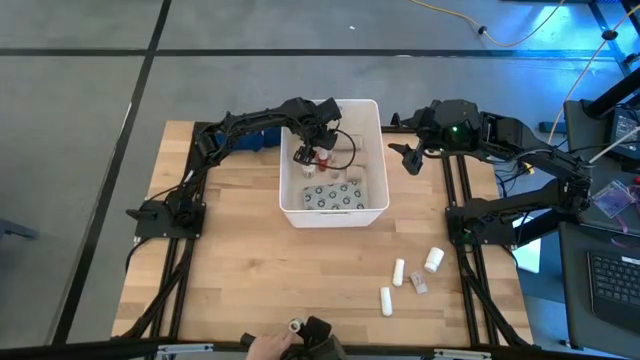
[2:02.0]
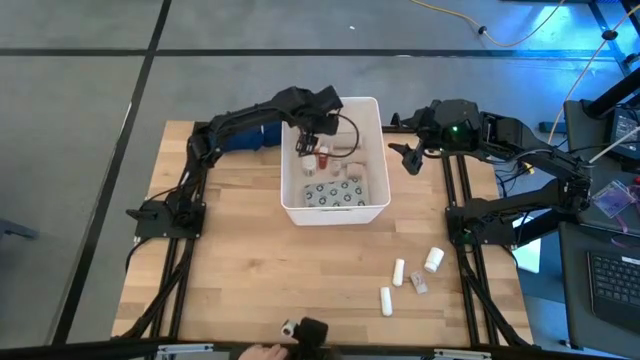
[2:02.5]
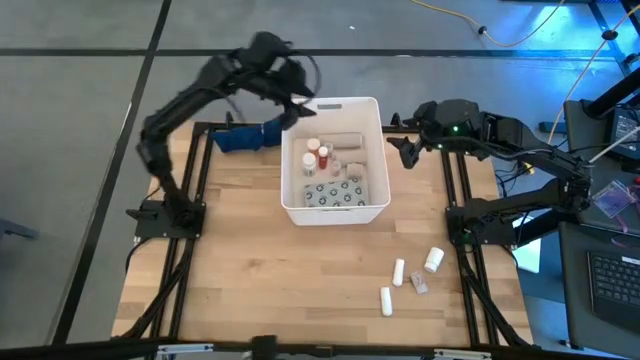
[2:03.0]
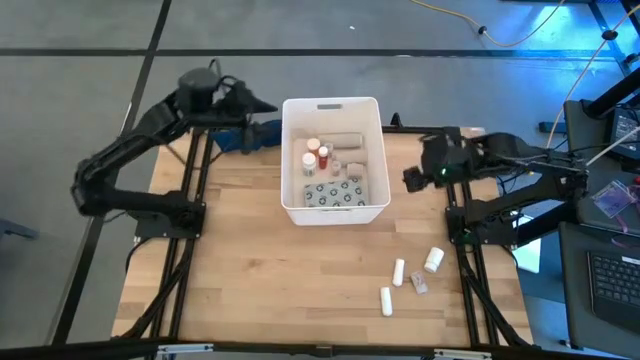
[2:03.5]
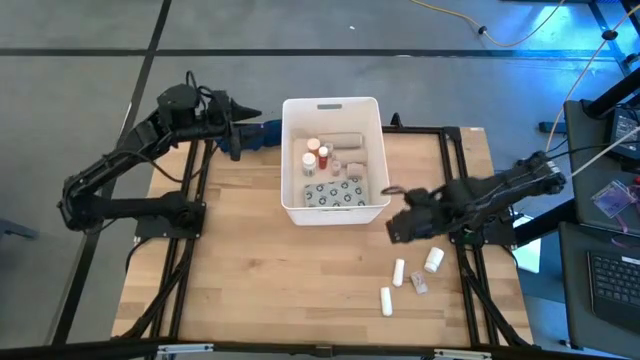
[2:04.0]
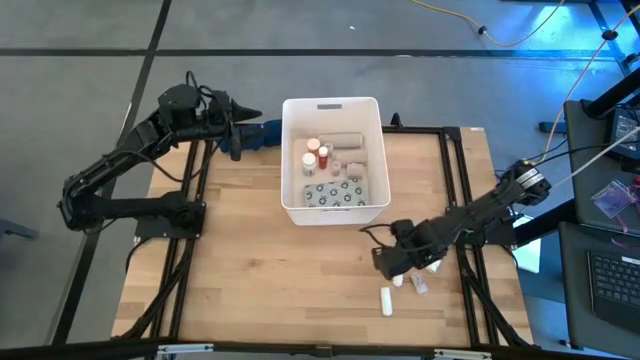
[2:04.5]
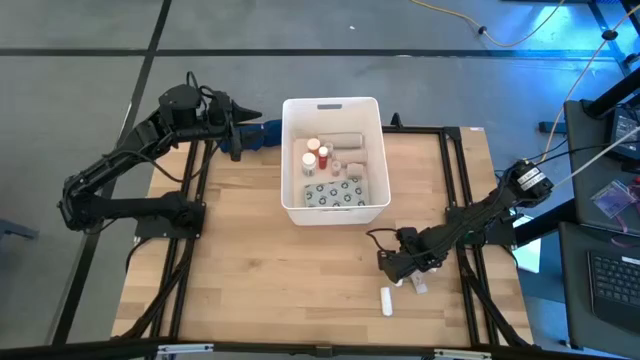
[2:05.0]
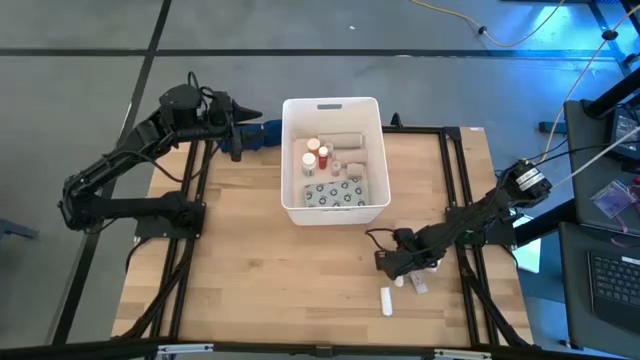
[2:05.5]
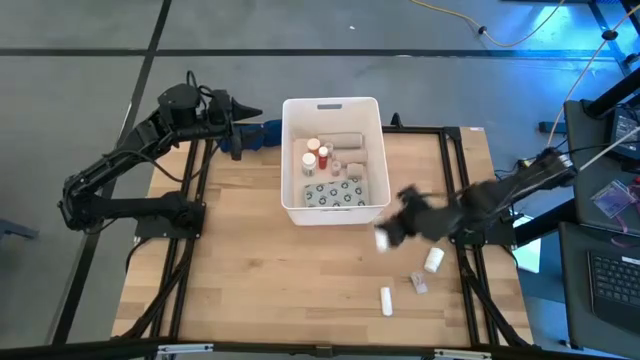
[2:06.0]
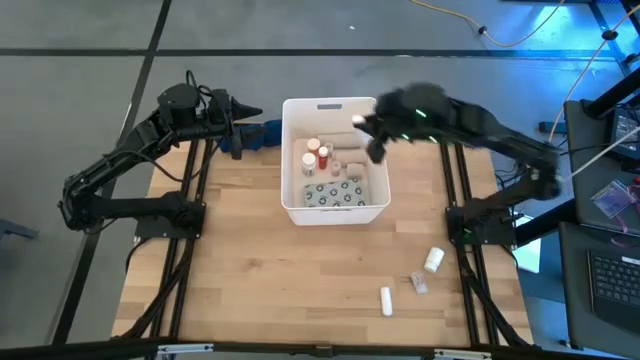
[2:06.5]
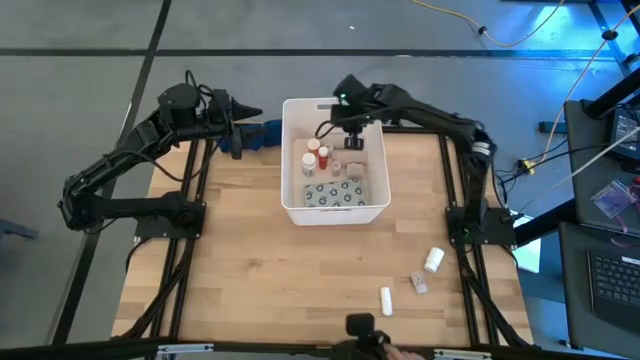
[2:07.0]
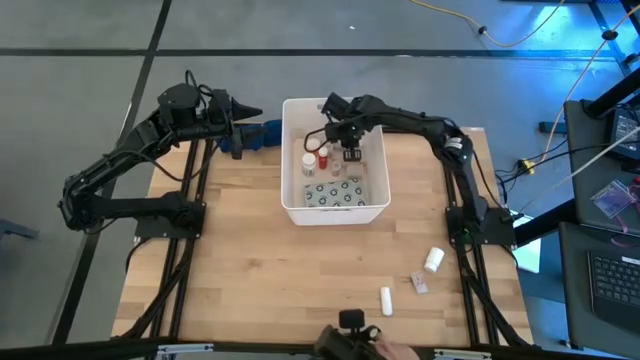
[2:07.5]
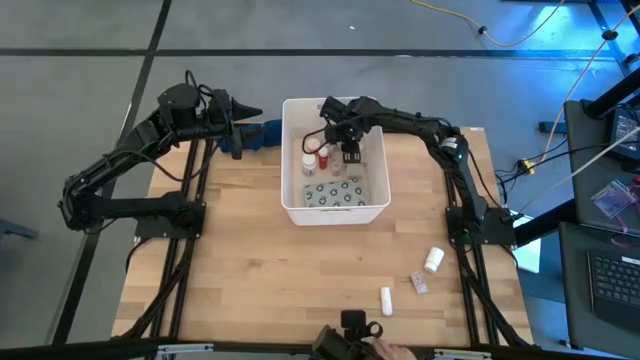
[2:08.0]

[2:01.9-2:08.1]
Task: Pick & place medical supplies in basket/bin
Put the top white gauze into the bin

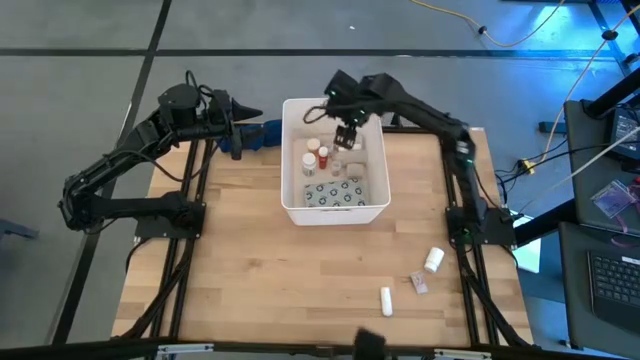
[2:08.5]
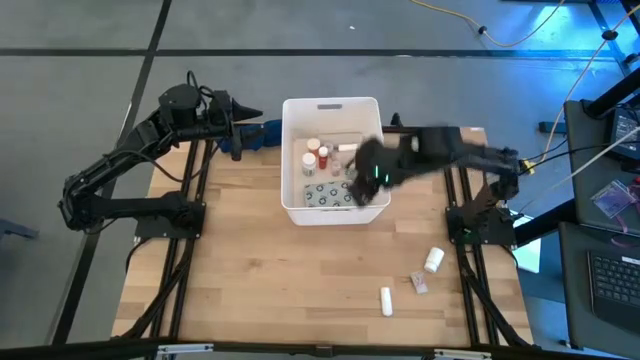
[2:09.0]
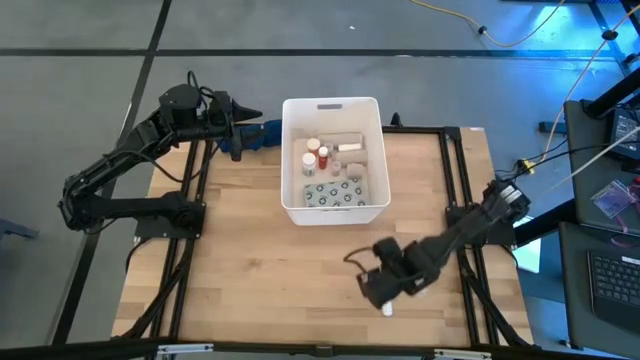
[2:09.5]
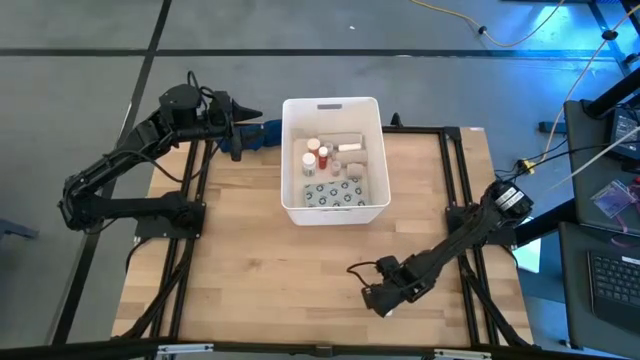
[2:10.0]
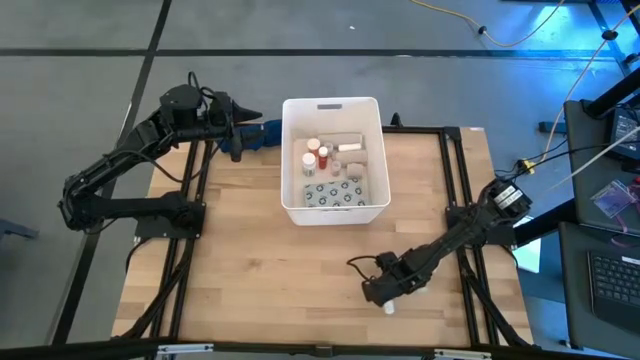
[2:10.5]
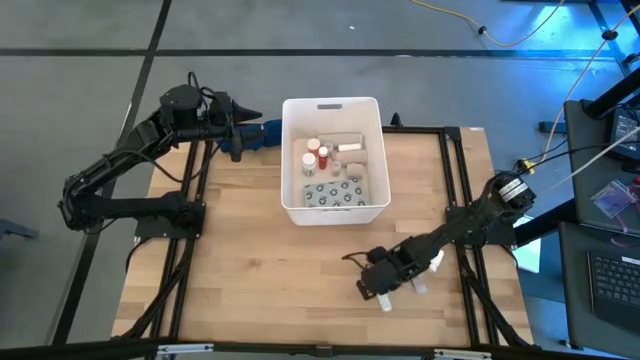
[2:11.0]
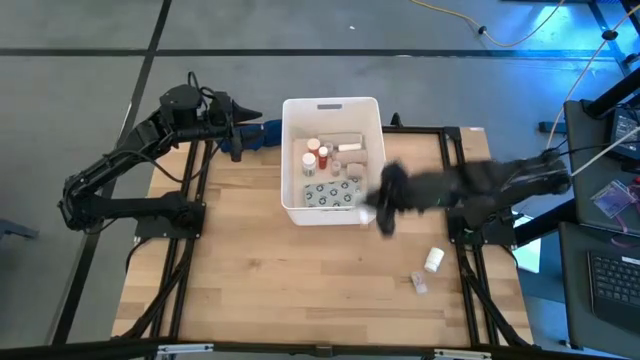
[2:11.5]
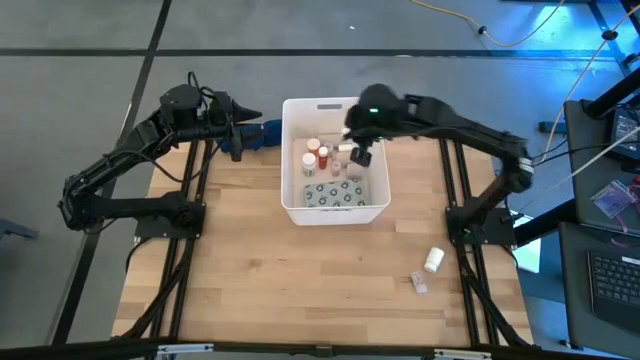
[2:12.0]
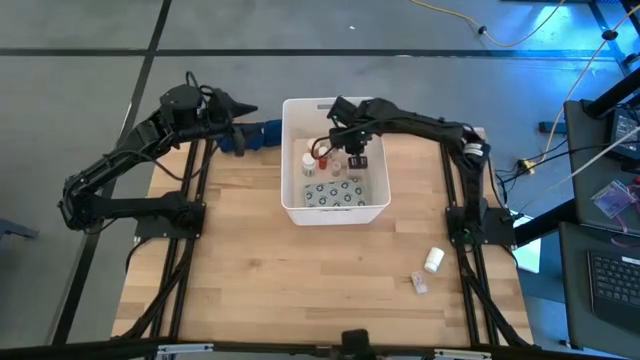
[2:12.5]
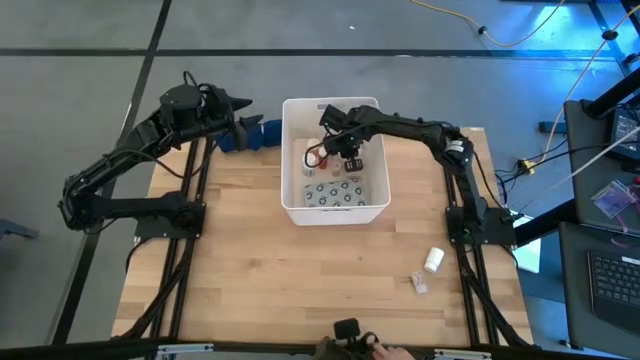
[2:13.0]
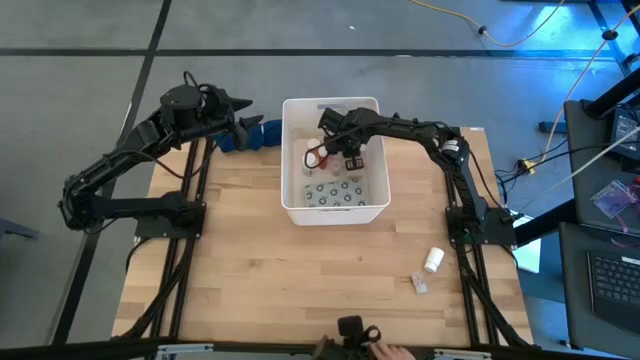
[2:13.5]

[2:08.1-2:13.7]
Put the white gauze into the bin

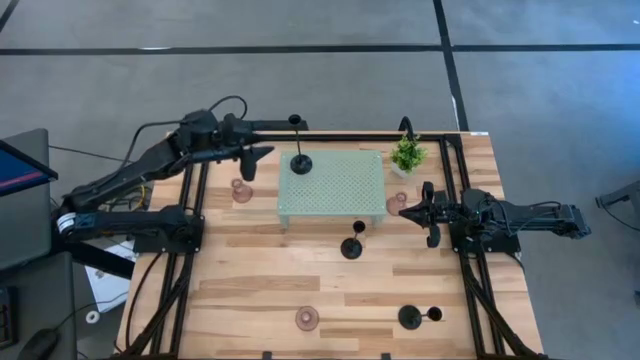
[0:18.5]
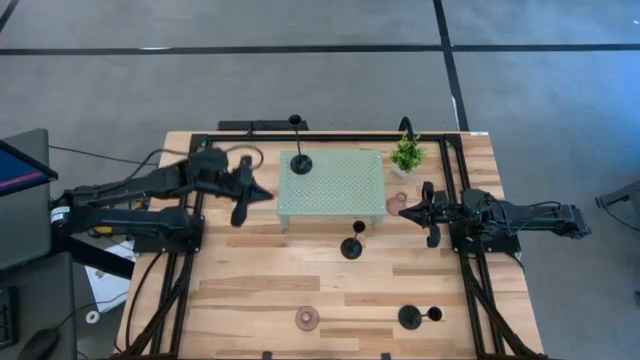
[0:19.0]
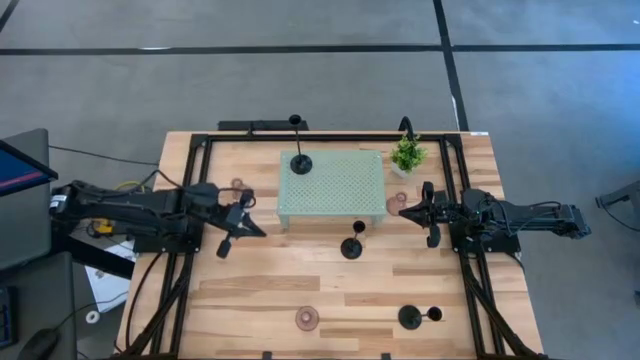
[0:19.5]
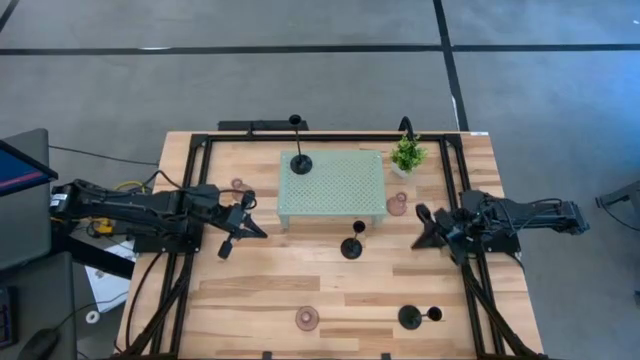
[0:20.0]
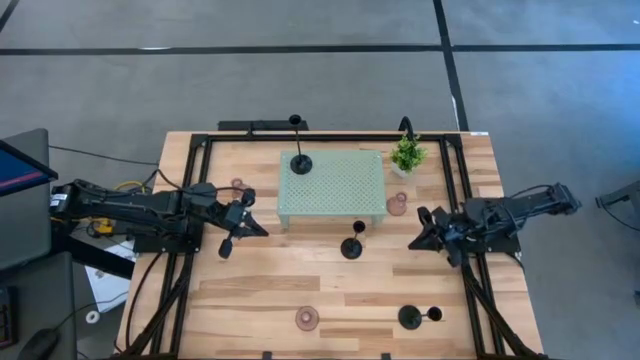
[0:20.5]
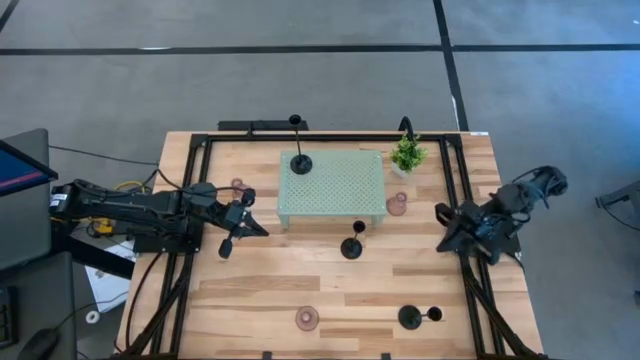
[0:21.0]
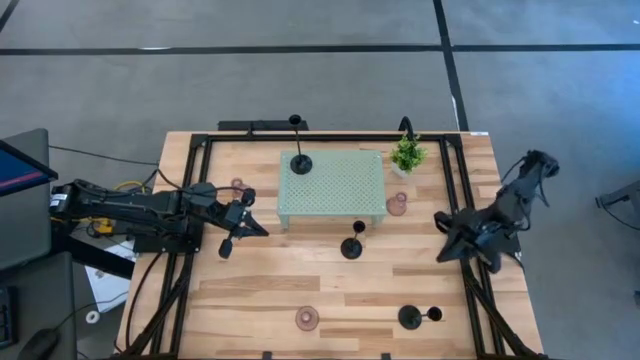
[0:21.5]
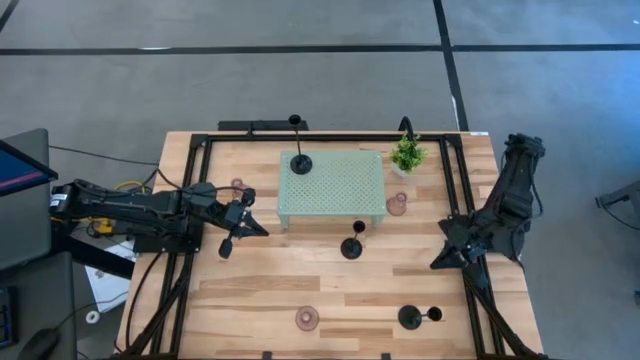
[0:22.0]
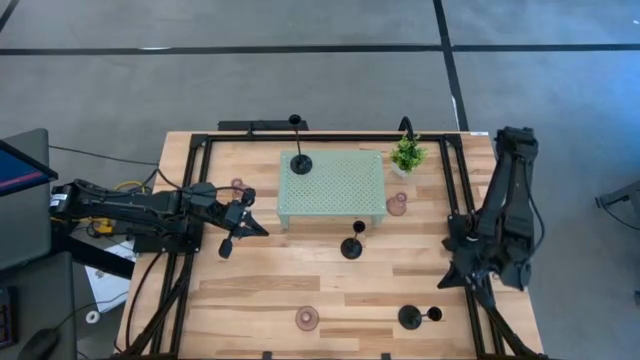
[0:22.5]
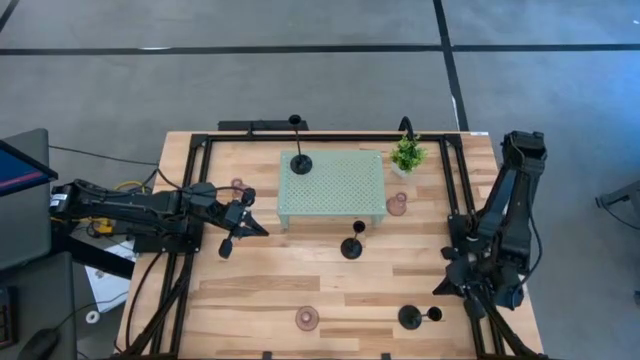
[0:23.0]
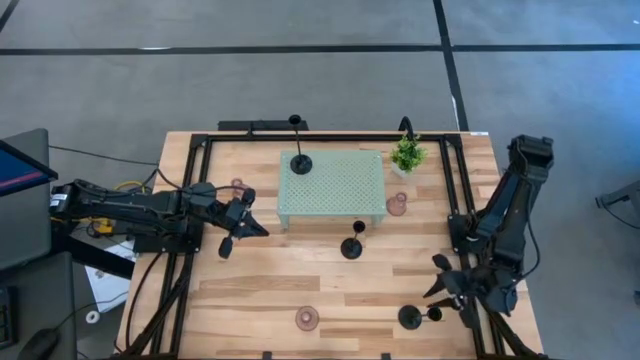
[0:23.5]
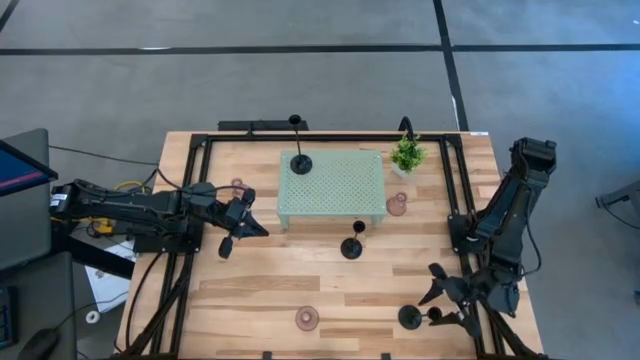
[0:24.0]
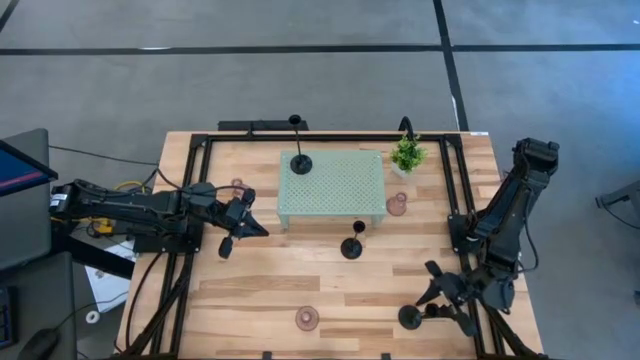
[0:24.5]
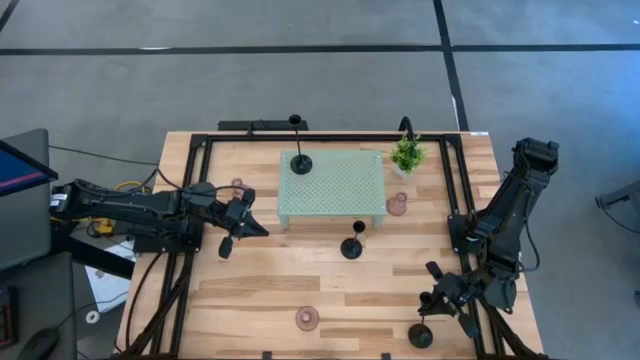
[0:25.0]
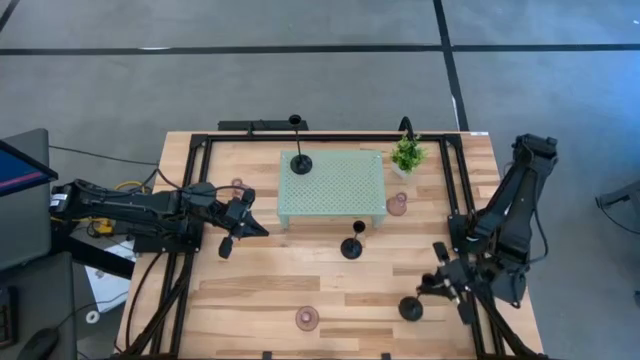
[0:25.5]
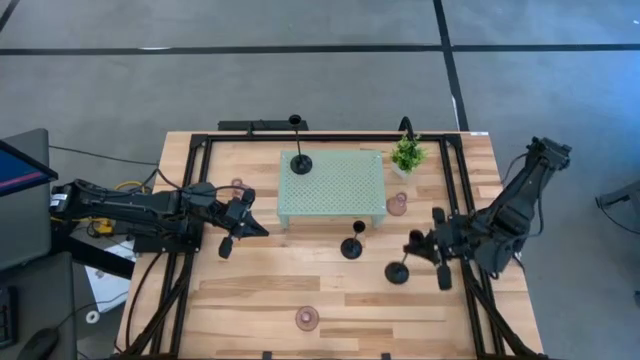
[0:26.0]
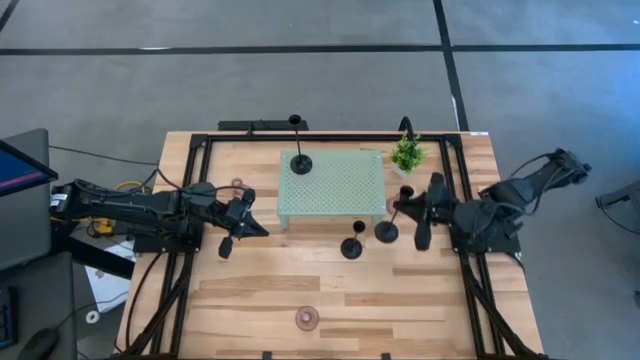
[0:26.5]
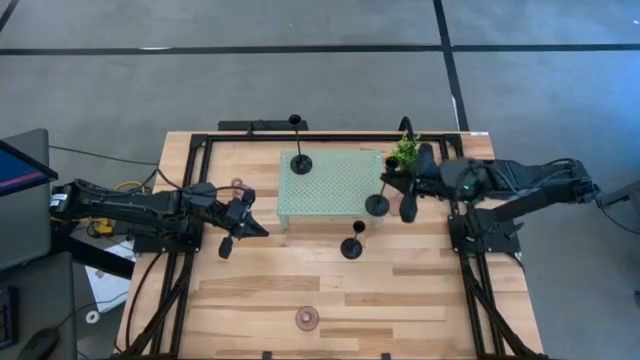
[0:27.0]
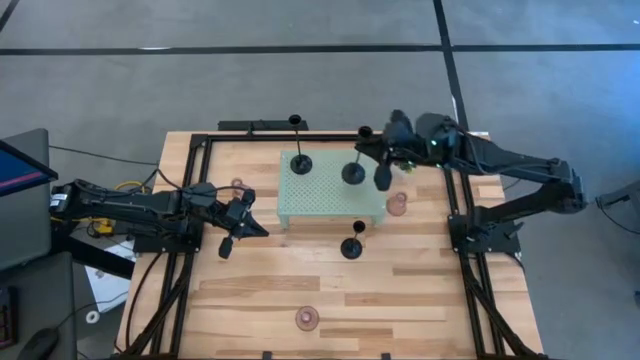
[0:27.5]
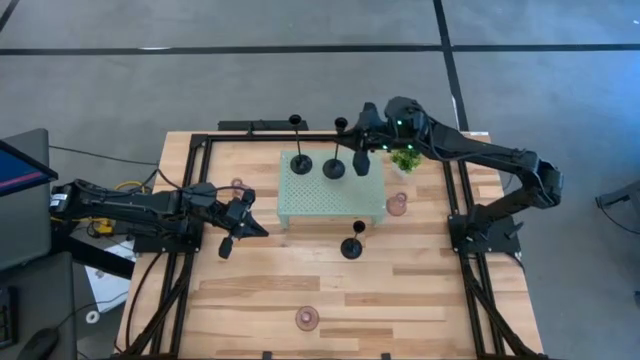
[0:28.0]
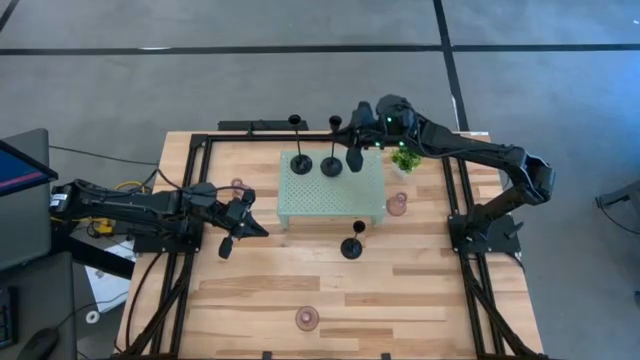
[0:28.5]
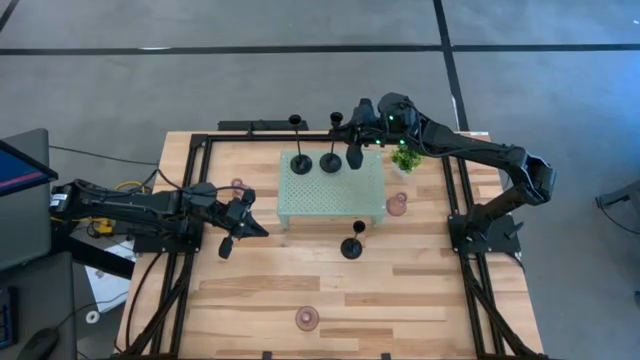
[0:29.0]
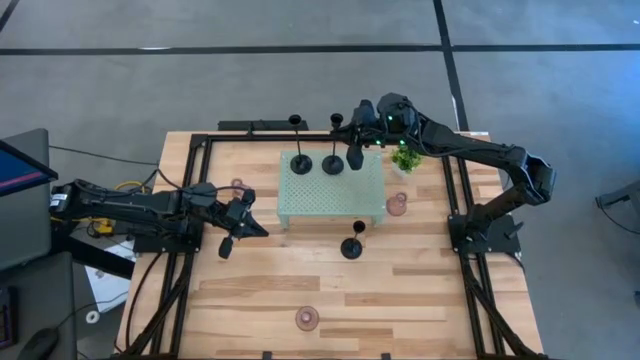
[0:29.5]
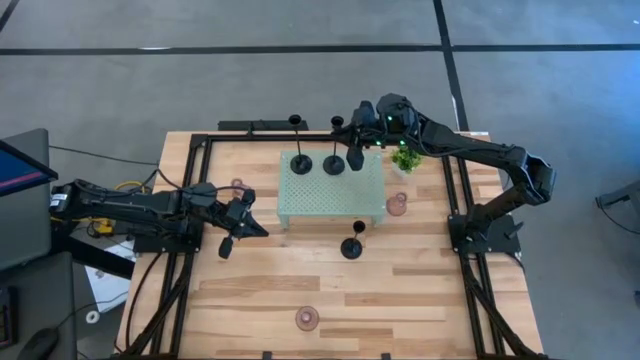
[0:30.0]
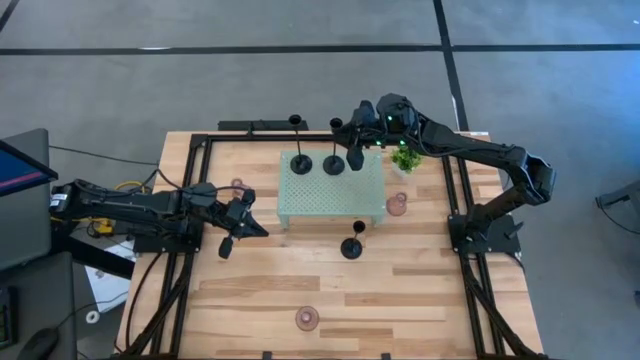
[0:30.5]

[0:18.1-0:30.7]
Task: Pick & Place candle stick holders
Put the right black candle holder on the shelf
